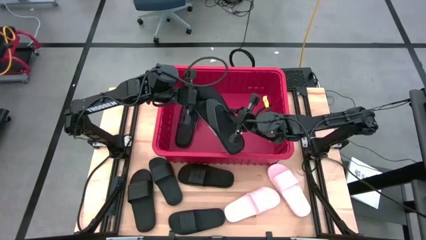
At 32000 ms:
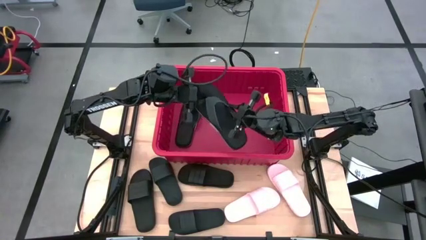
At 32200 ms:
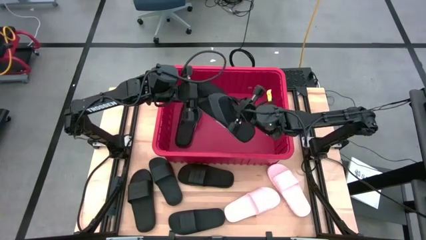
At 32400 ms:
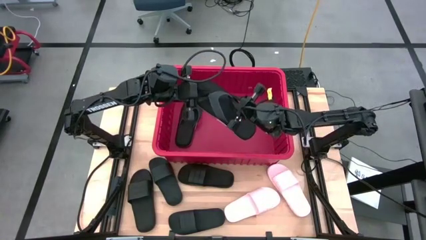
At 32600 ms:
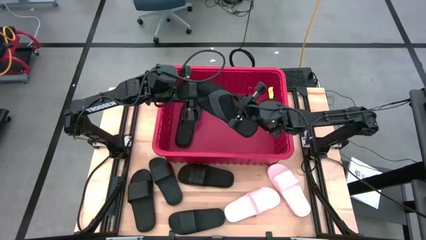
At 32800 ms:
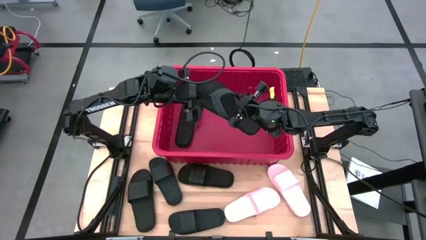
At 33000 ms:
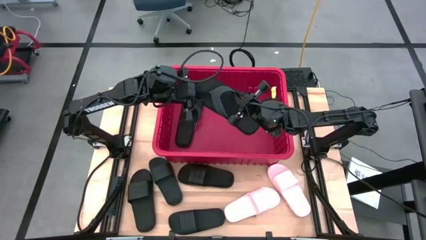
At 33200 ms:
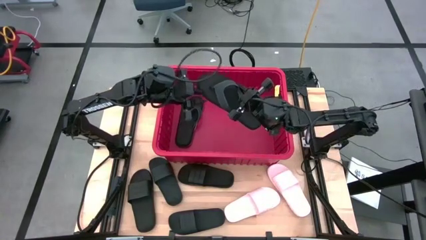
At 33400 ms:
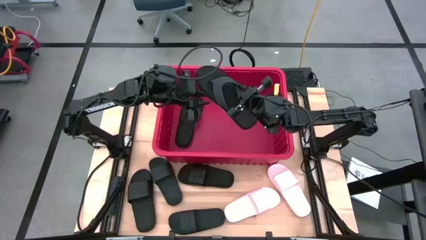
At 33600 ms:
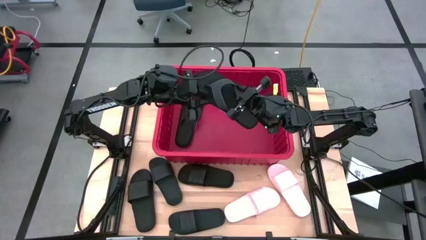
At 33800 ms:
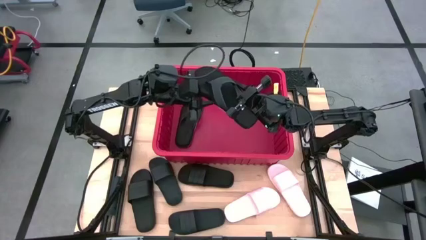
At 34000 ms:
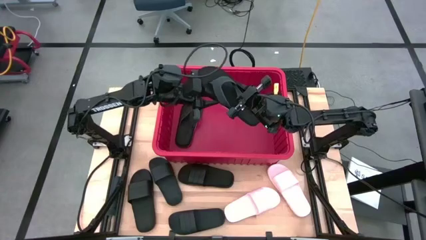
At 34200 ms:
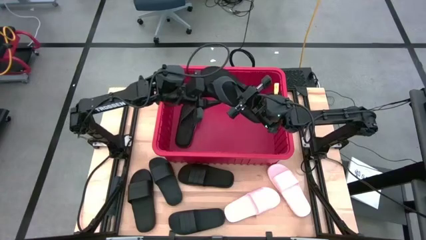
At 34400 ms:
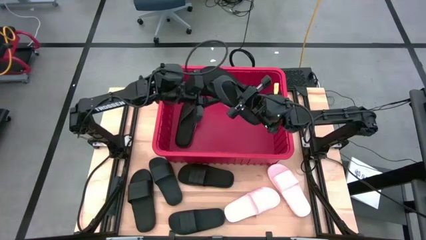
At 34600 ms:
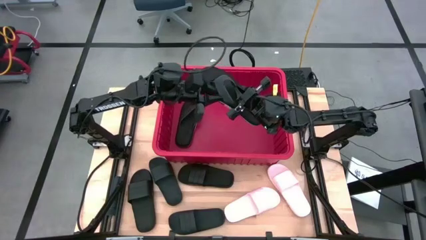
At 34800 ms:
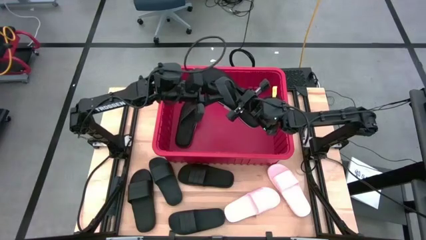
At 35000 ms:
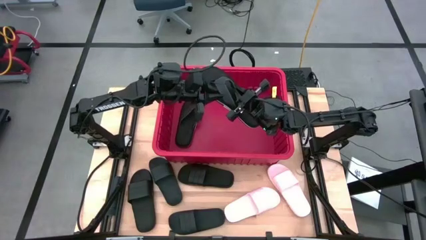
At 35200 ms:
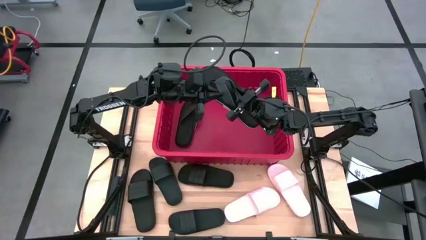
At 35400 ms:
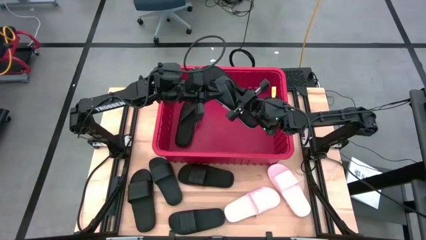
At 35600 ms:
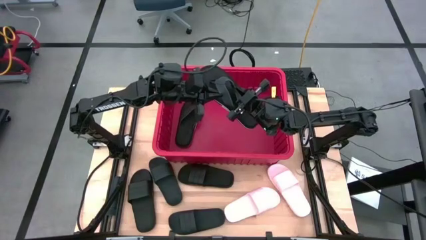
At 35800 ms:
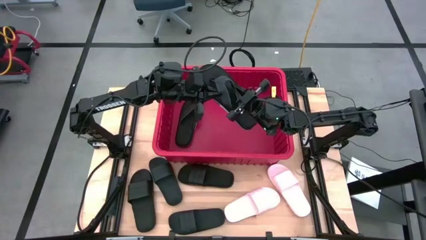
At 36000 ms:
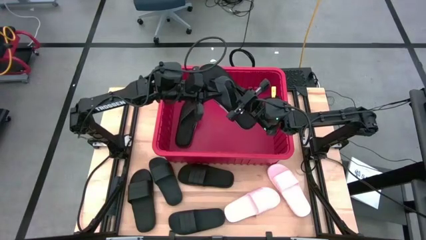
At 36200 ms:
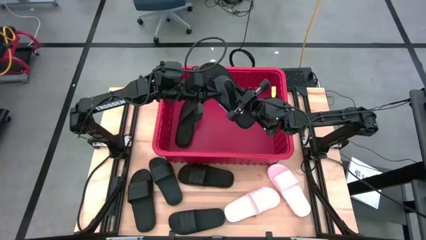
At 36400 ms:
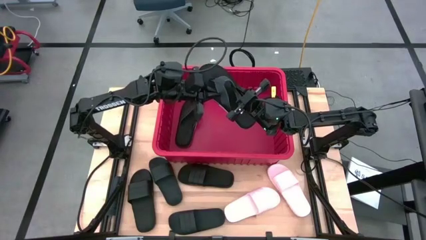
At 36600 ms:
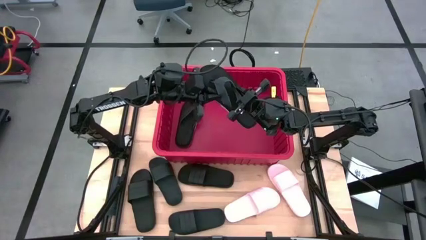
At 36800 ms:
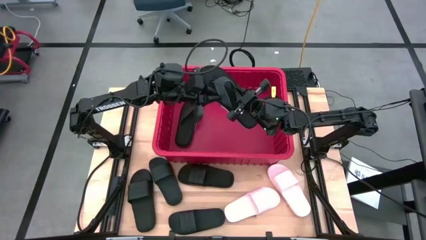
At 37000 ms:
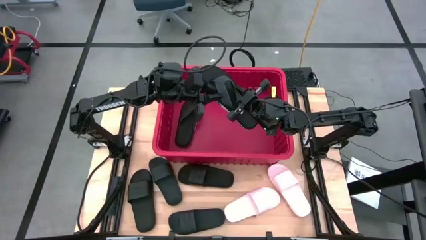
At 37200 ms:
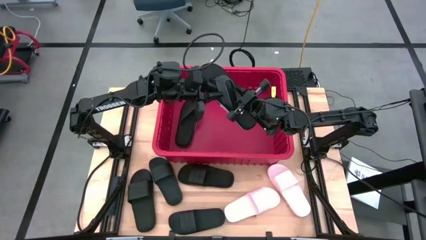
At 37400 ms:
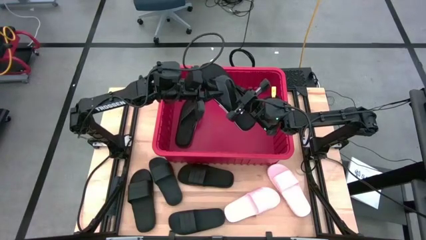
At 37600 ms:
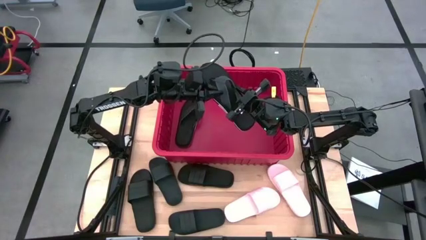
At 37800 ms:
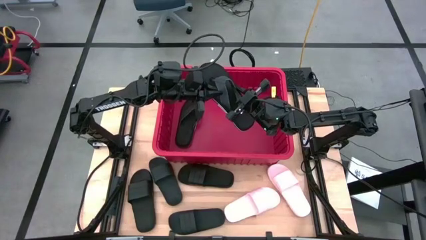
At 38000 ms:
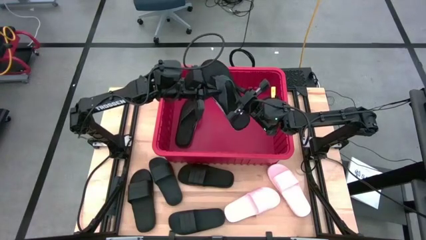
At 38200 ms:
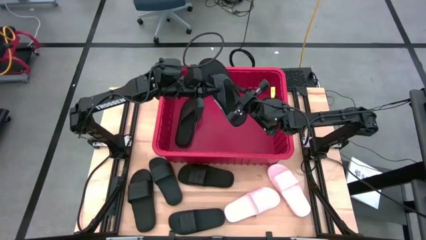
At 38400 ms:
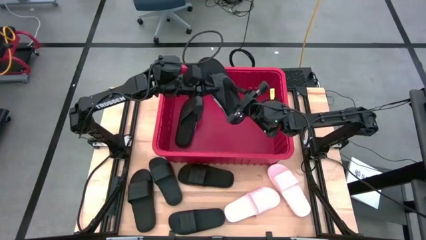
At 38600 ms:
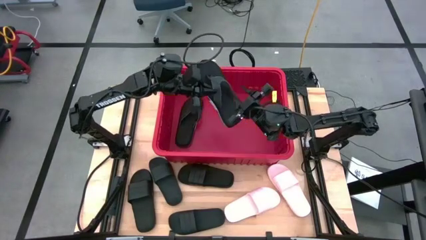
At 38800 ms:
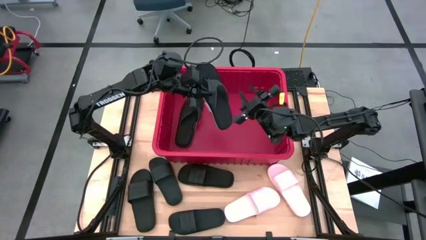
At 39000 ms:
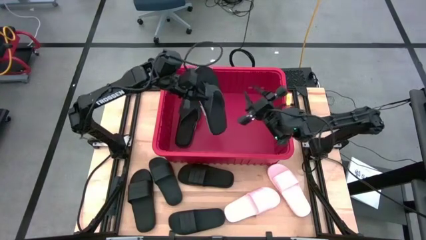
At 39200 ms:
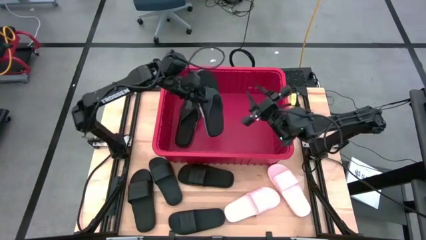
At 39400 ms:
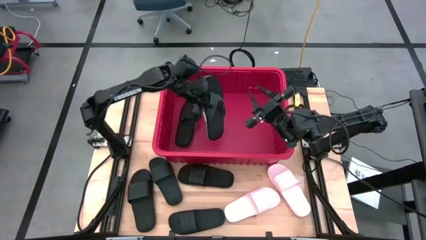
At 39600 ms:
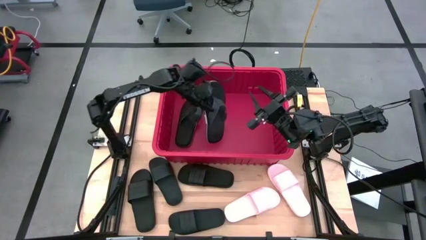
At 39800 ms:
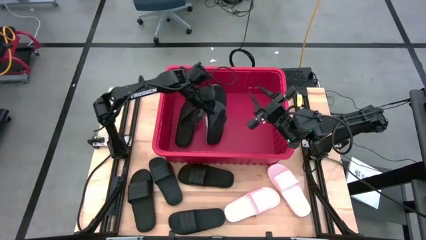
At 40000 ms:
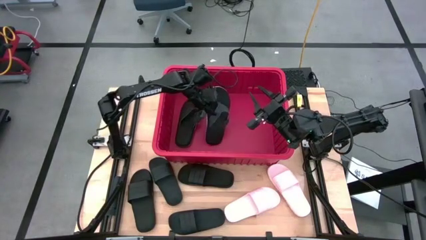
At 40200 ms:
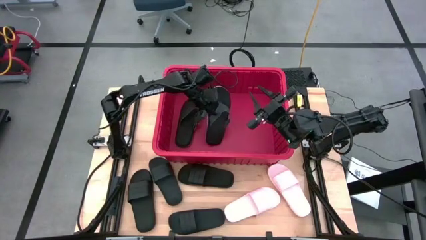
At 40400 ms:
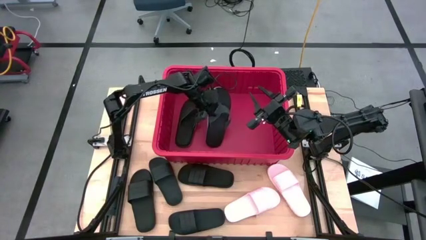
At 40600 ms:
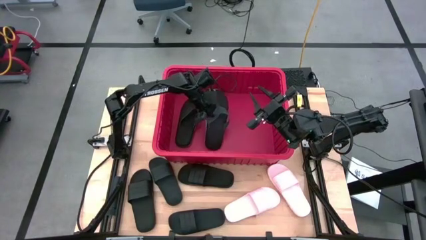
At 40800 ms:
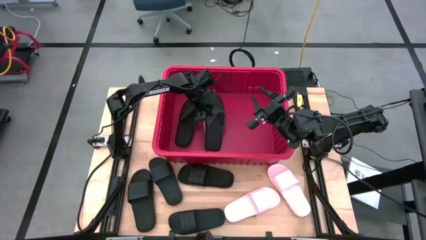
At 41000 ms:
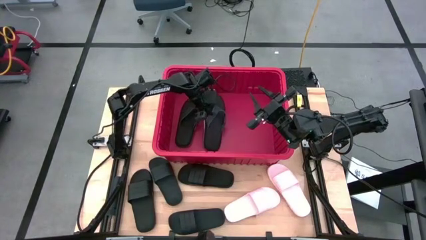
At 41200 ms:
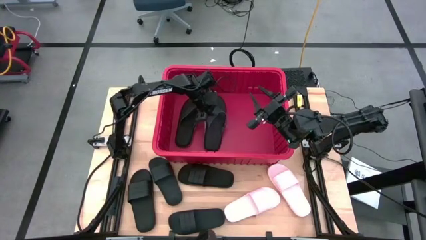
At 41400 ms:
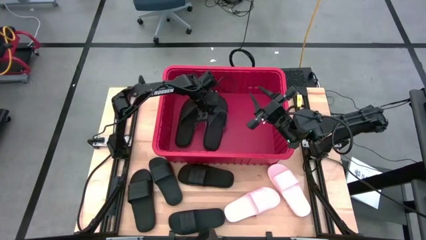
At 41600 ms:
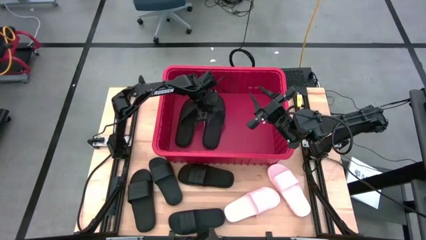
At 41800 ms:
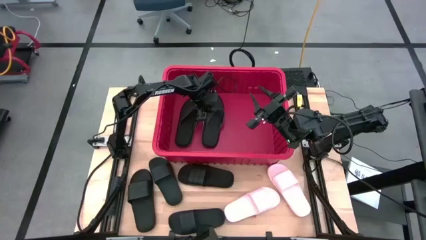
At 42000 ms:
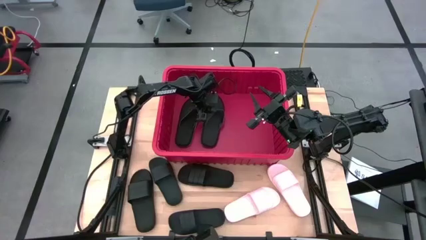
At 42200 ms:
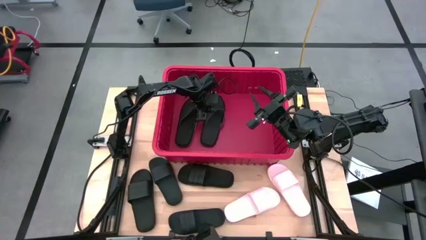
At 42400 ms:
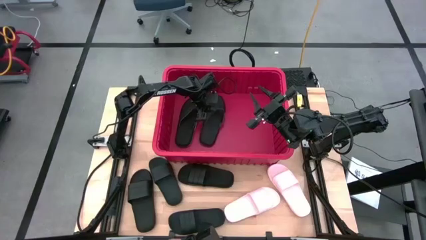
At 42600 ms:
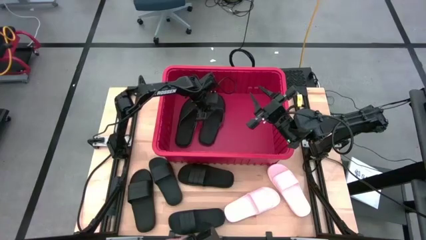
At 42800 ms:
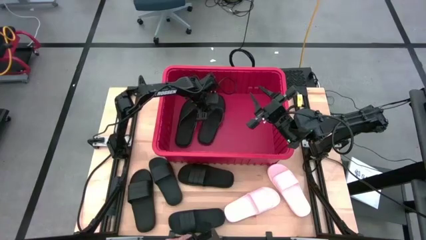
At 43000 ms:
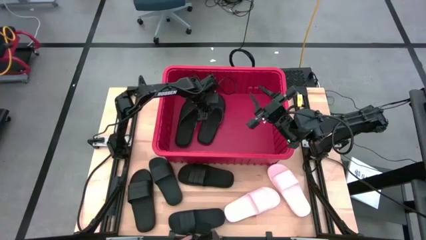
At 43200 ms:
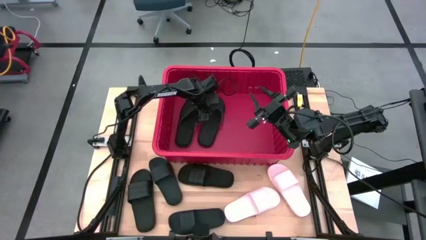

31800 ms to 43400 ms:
Task: Pick and place slides into bin
Put the black slipper into the red bin
